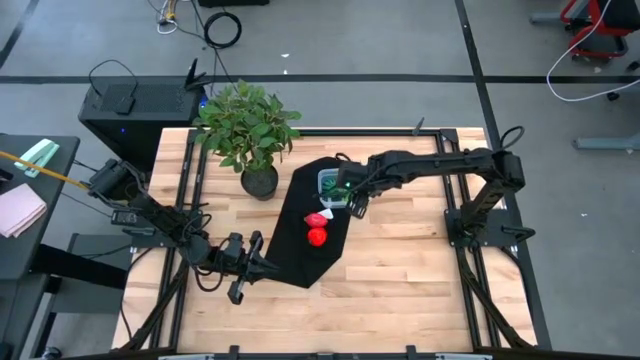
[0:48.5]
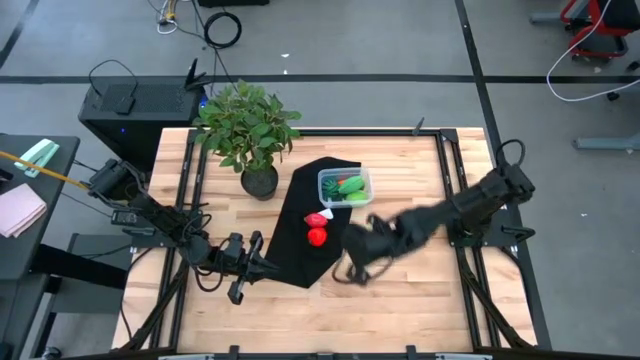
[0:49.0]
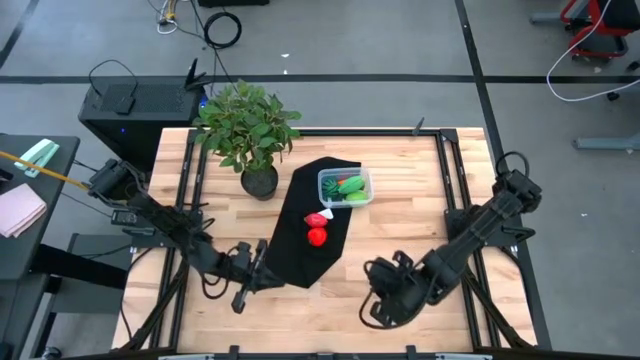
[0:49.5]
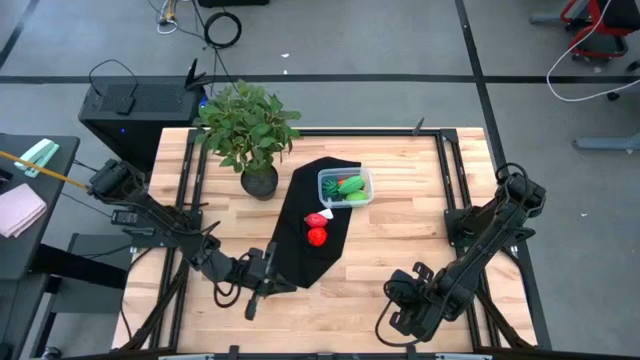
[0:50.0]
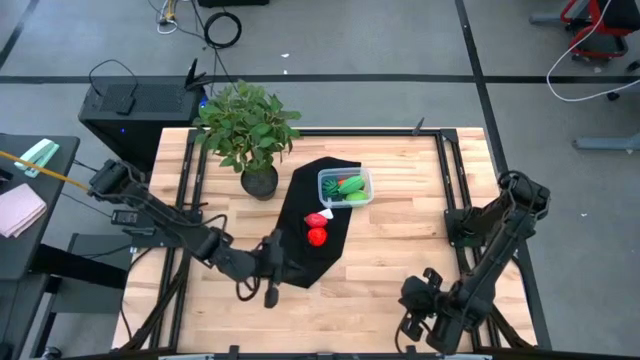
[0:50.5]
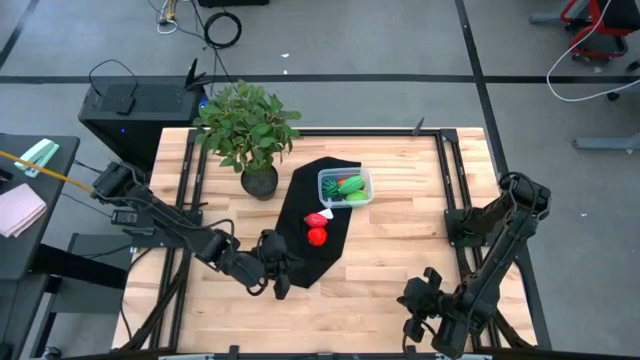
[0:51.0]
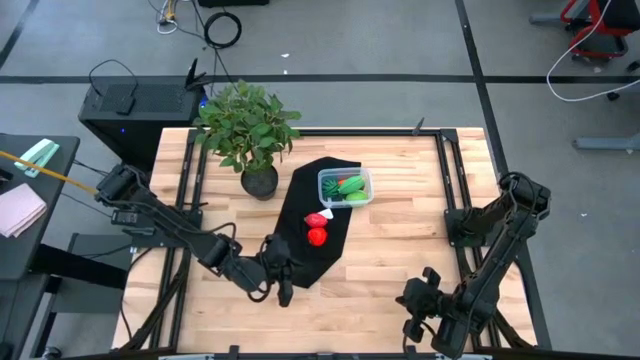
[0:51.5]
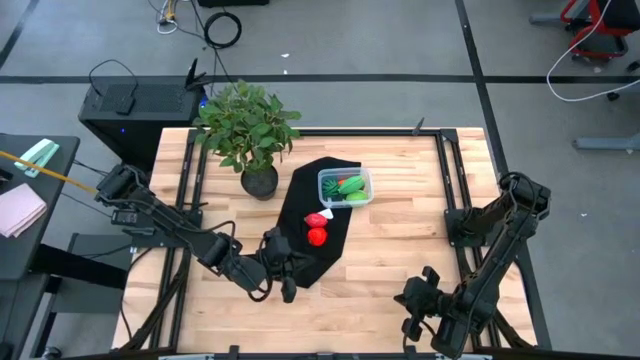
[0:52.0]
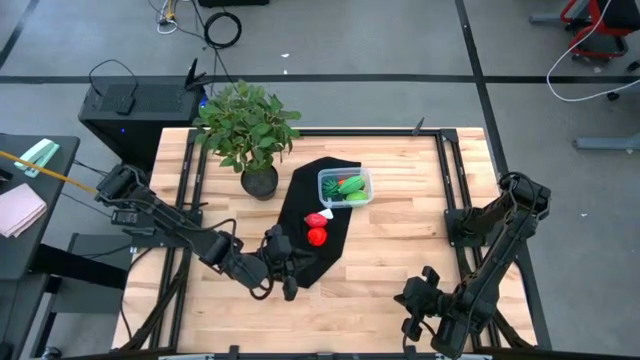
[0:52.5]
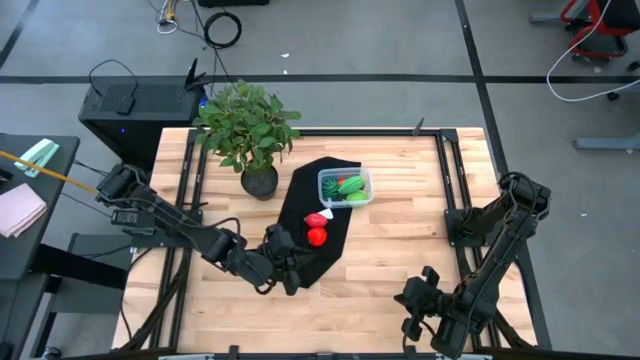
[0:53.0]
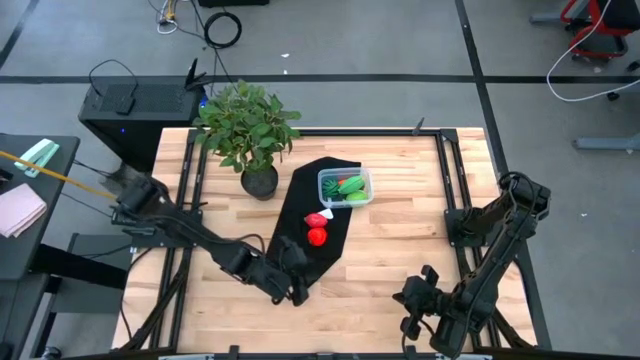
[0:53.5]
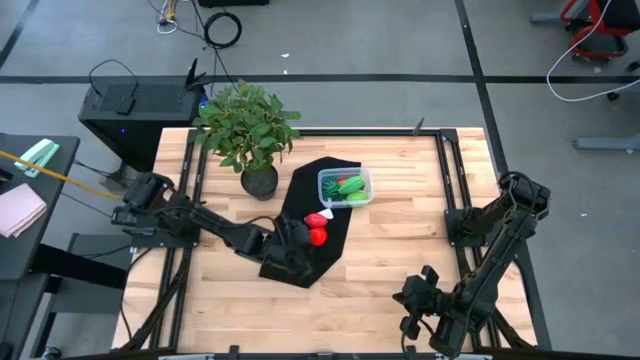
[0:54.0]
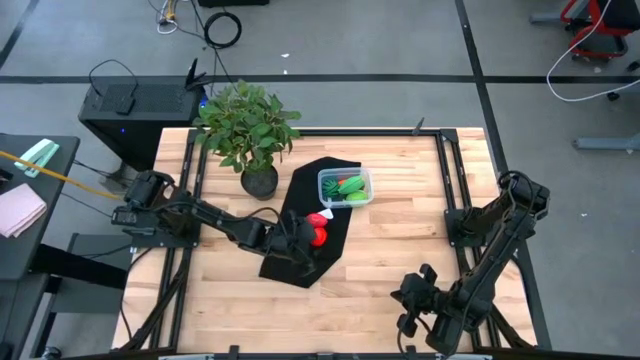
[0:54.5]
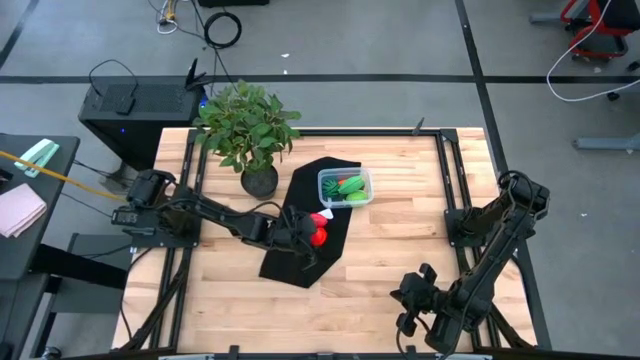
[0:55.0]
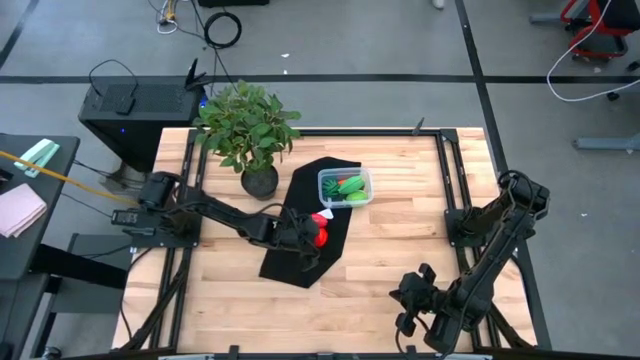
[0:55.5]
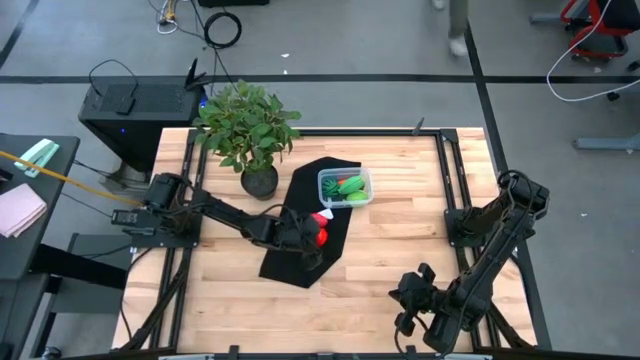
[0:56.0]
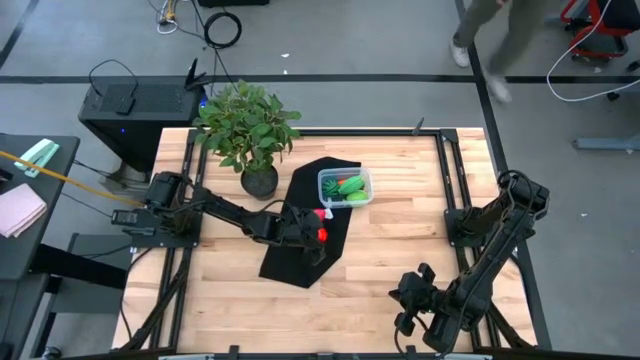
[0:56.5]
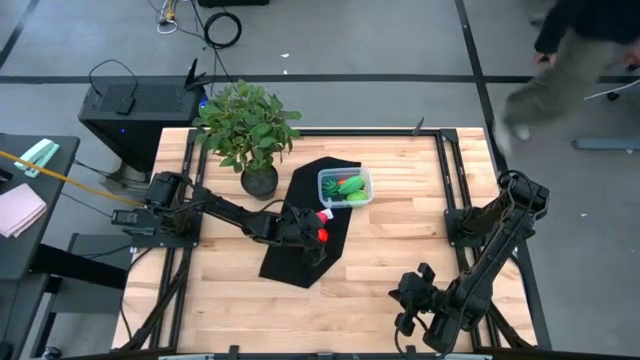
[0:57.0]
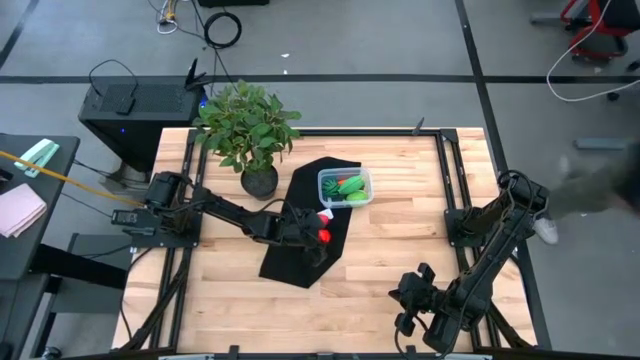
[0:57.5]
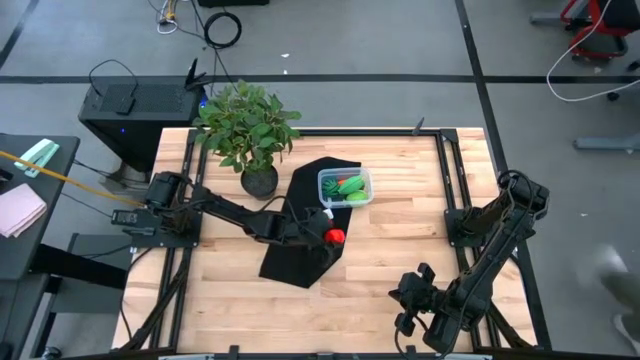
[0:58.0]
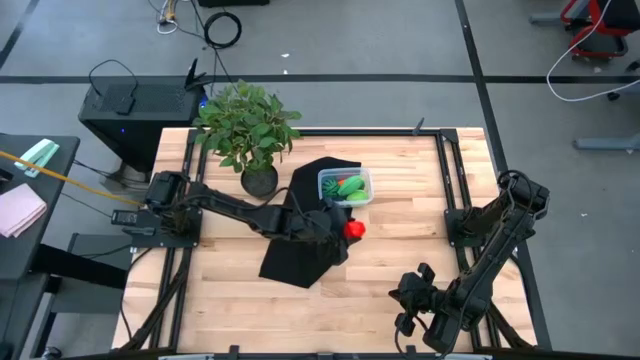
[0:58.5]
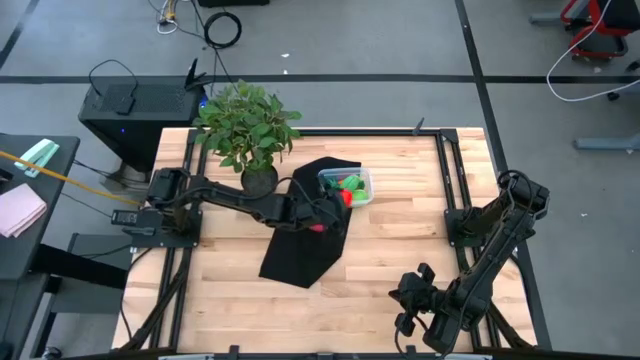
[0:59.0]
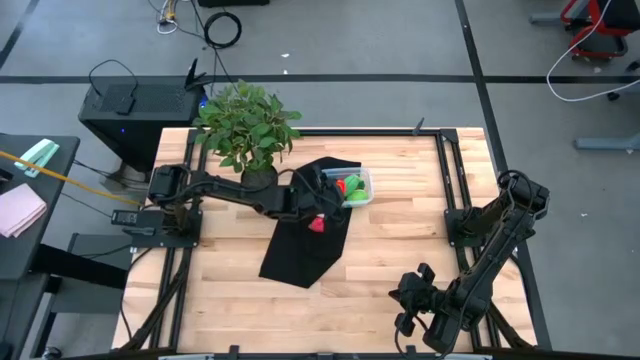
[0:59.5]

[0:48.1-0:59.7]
Task: Pick and placing Produce into tupperware
Put the apple into the transparent bin

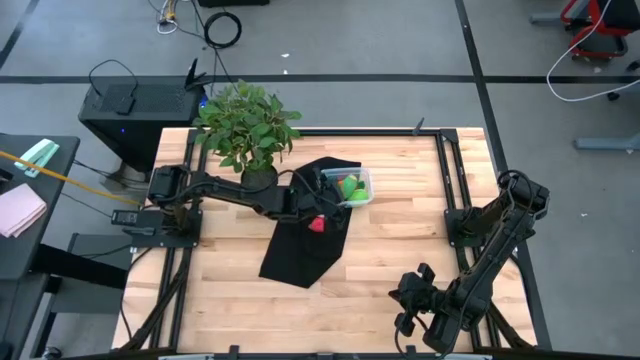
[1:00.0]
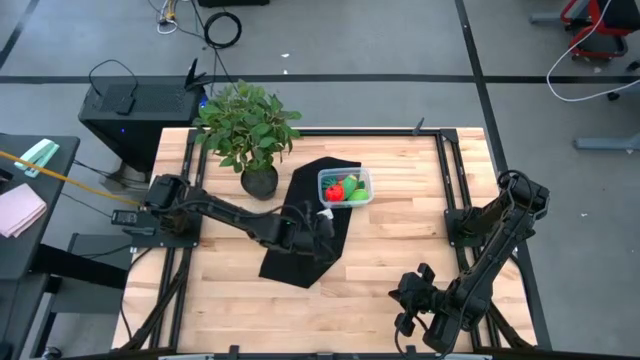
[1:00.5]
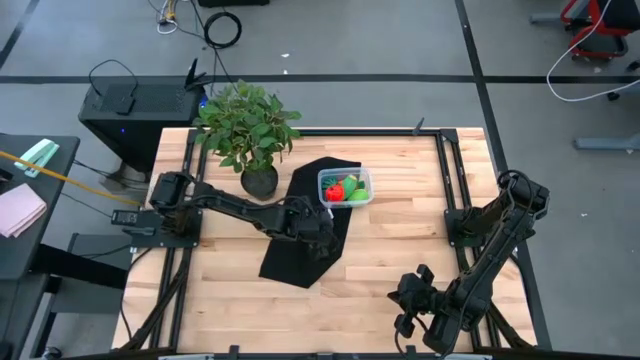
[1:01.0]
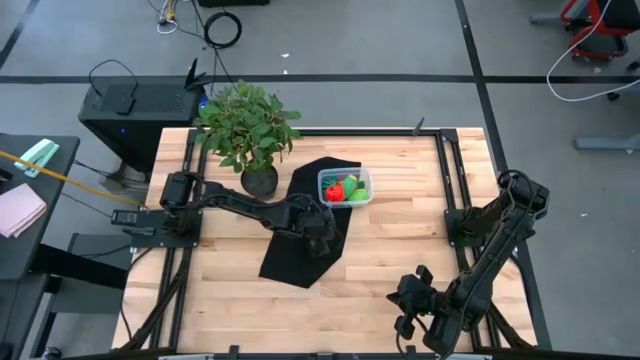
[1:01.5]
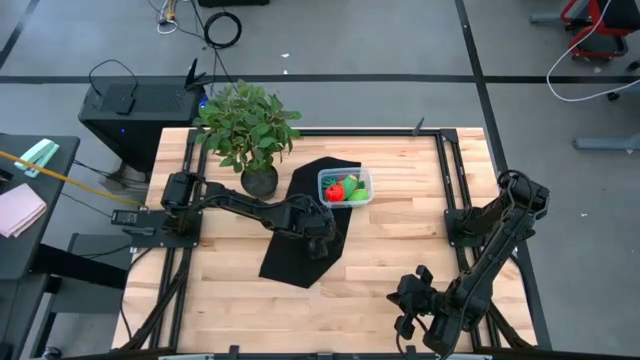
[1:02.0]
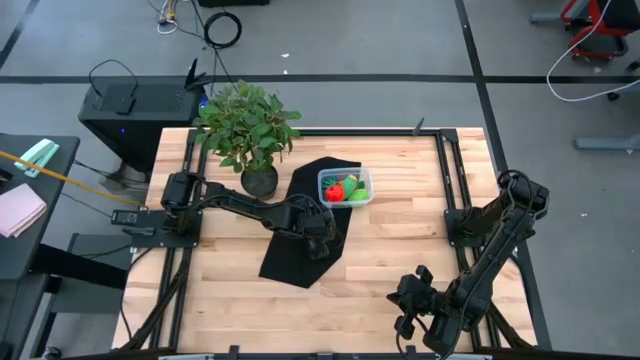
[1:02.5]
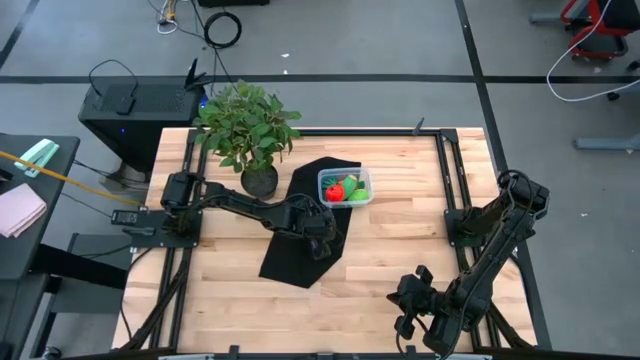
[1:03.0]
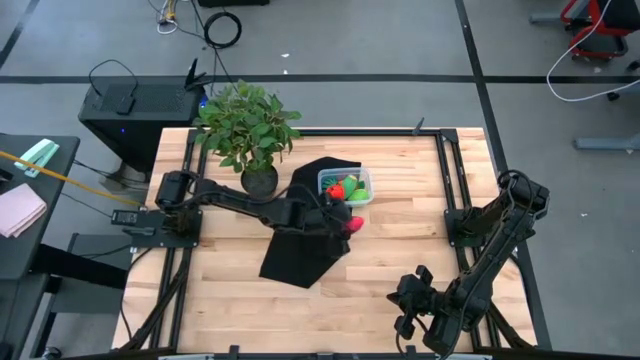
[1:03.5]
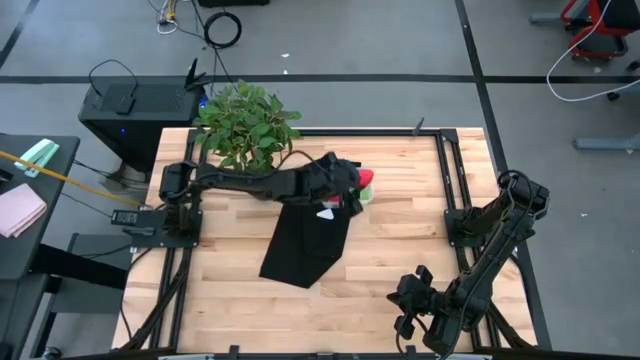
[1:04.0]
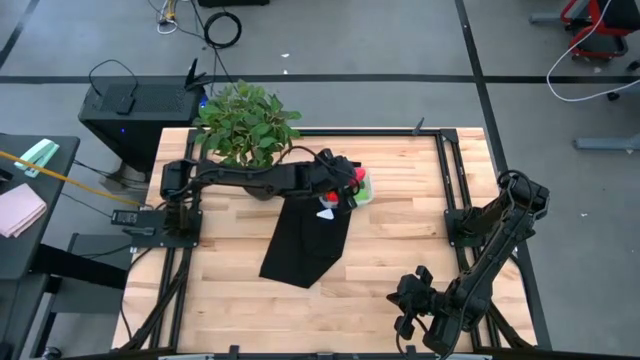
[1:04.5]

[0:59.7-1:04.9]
Put the dragonfruit into the transparent bin

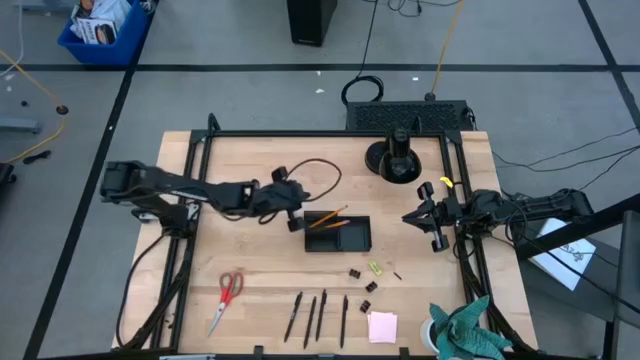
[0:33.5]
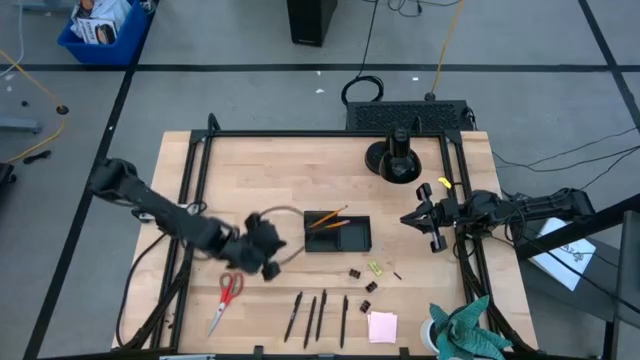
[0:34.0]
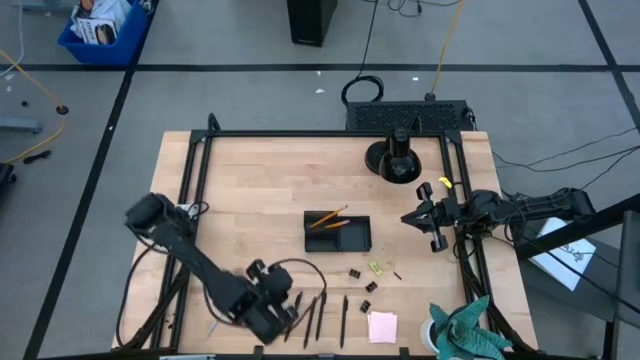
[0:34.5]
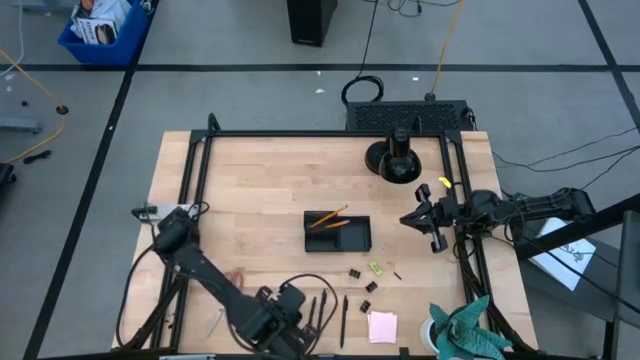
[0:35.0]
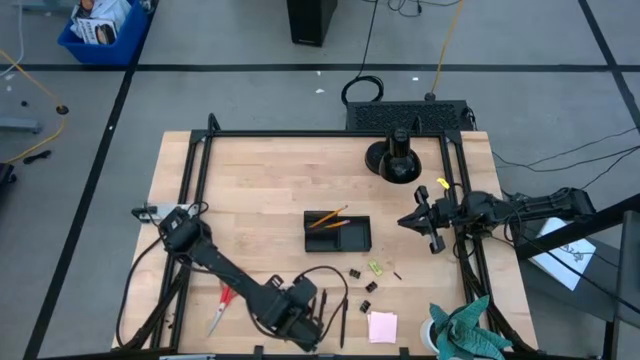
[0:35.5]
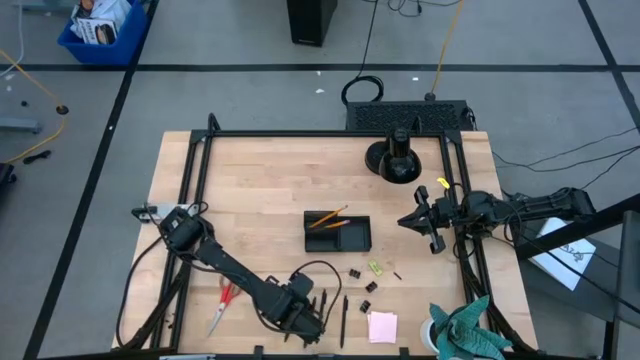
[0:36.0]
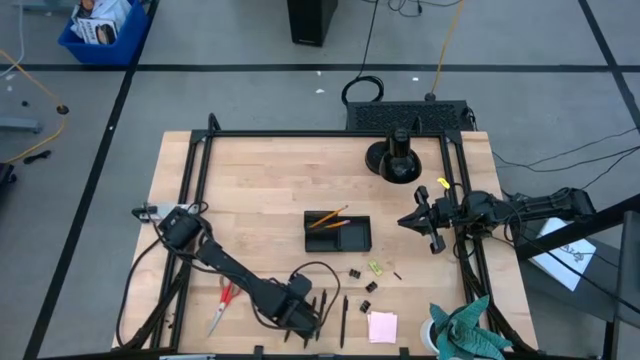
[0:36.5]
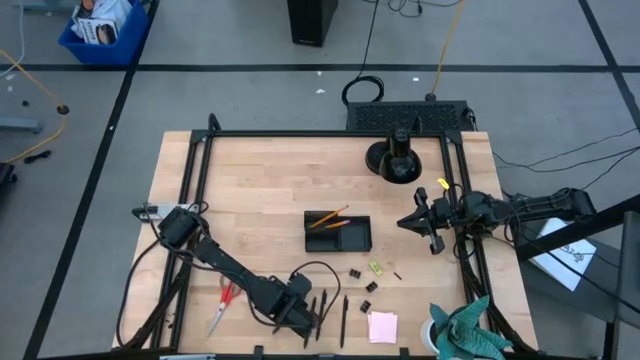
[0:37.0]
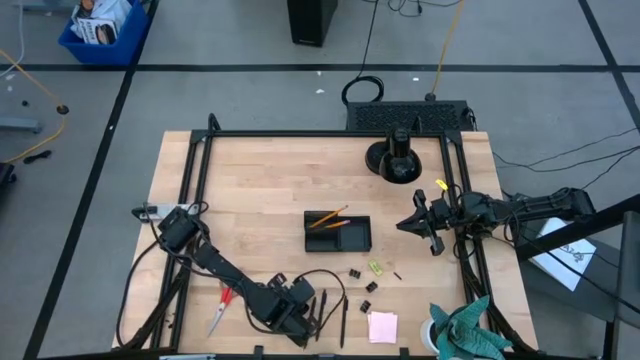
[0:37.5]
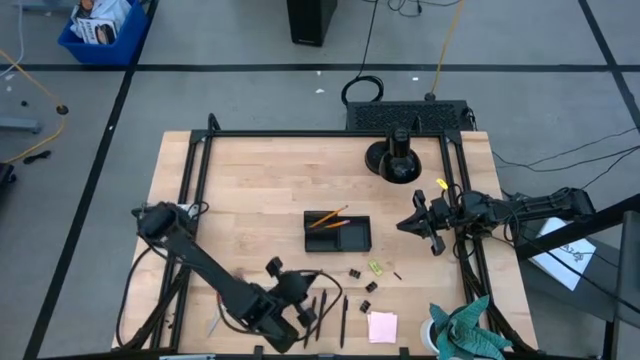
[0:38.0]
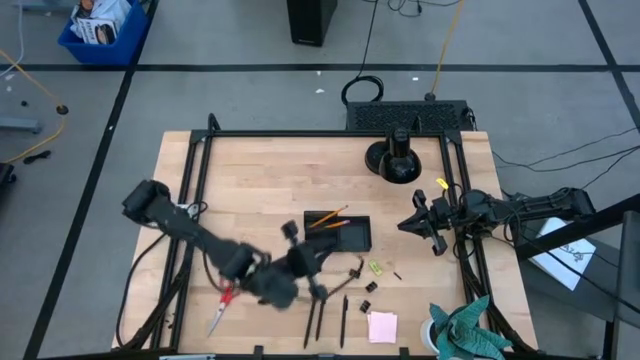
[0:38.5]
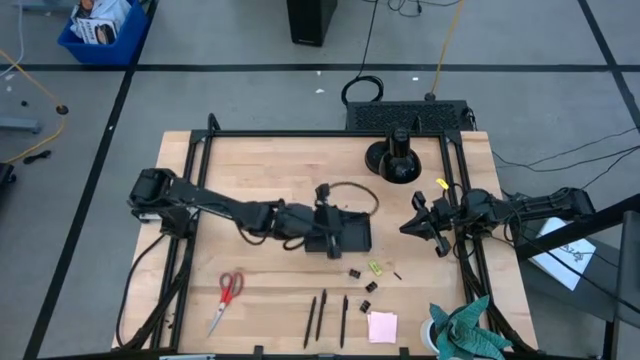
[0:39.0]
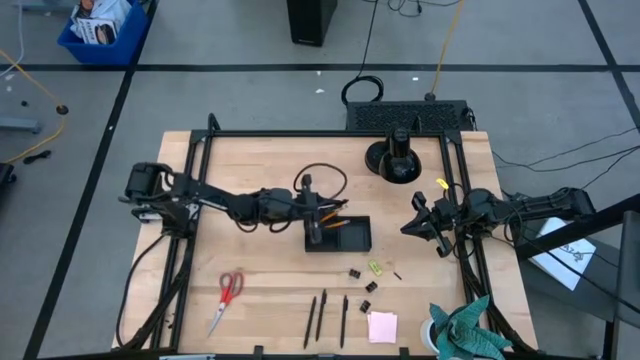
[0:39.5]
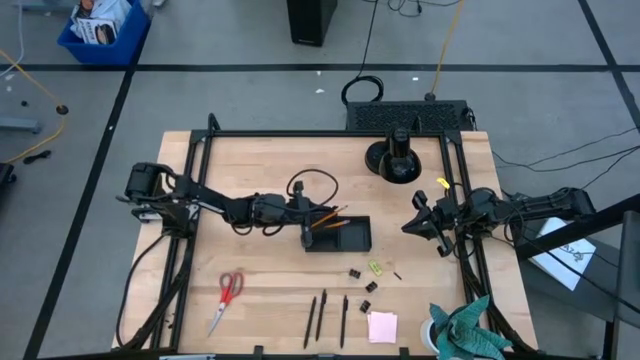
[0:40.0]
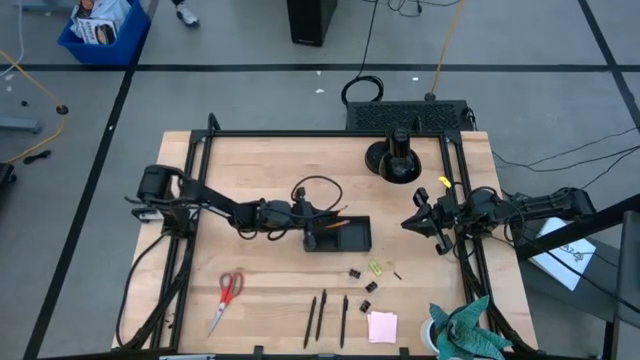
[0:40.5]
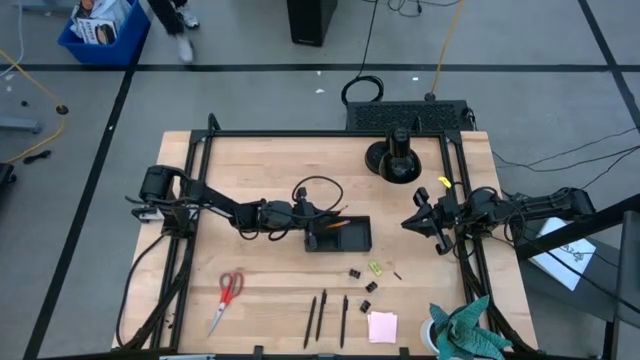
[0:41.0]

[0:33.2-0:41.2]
Task: Pick and place office supplies into organizer
Put the black pen into the black desk organizer
